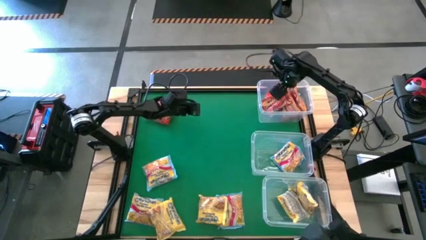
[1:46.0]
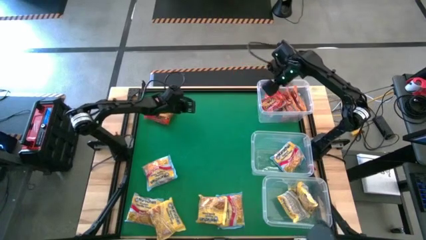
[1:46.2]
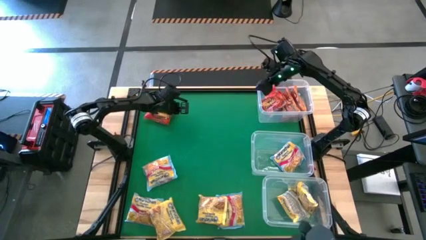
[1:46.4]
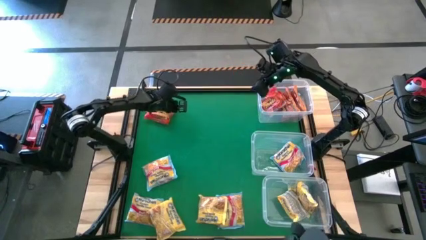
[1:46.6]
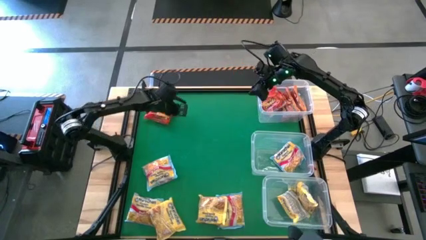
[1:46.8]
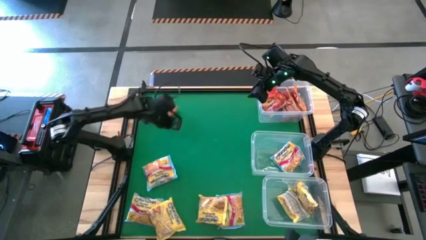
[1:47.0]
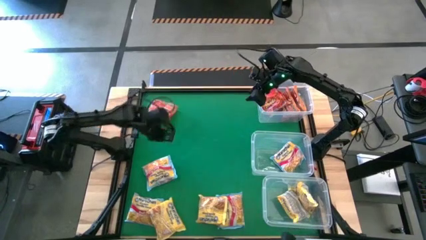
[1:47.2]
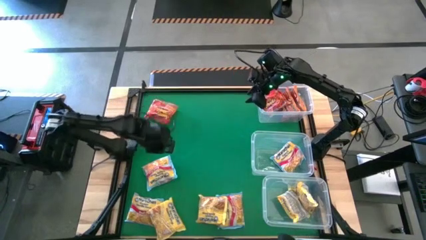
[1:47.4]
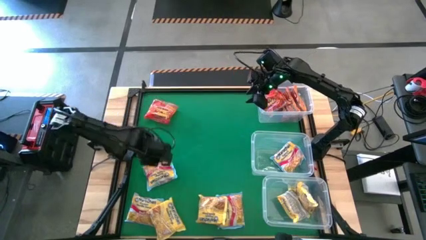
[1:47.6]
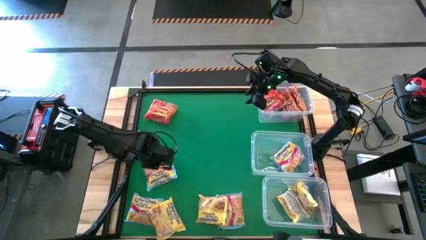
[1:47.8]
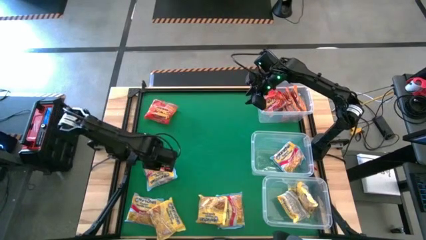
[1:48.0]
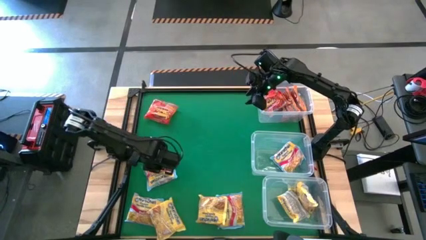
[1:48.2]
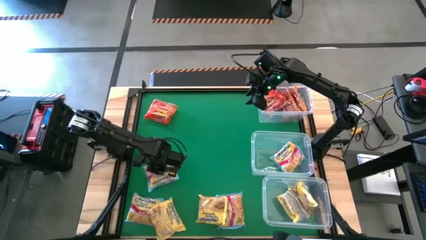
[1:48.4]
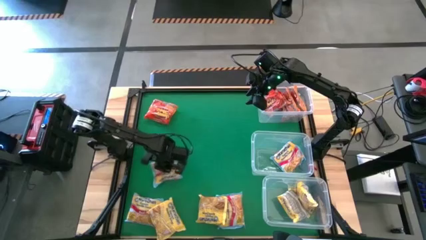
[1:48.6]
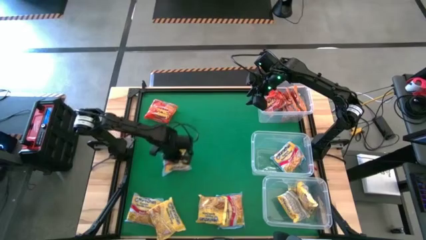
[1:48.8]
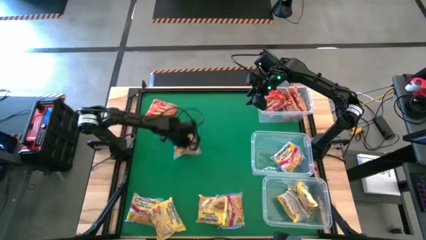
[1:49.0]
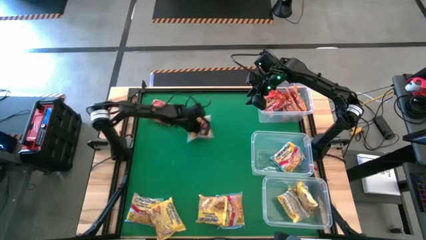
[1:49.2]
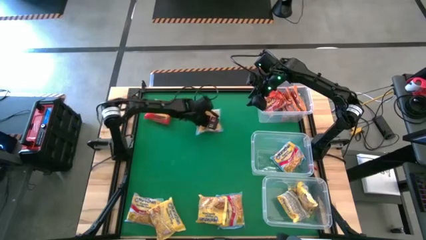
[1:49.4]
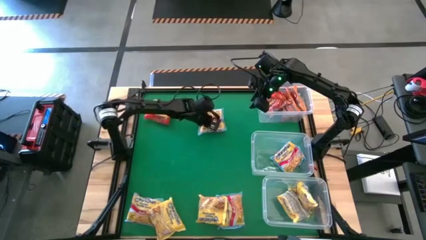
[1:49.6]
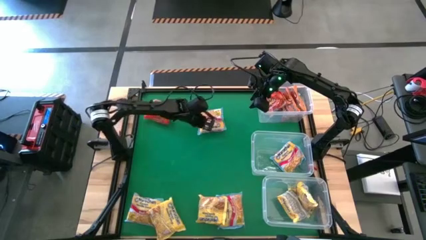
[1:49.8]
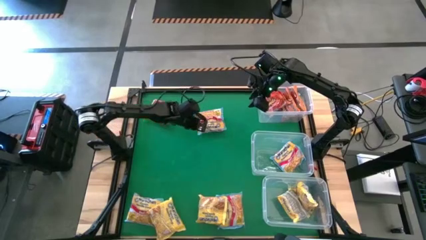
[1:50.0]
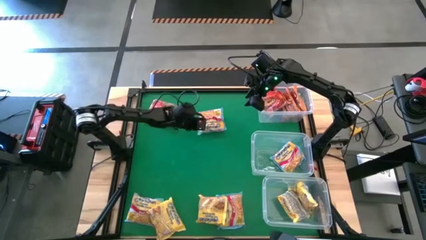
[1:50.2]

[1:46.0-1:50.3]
Task: Sort Maruchan noodles
Move the top blue noodle pack to the top middle of the table

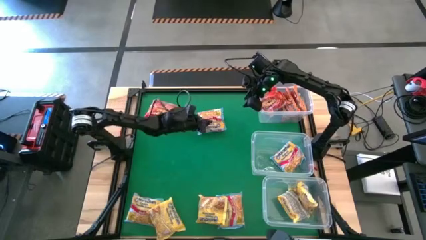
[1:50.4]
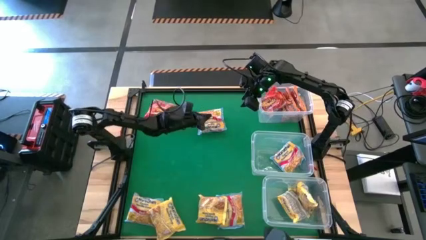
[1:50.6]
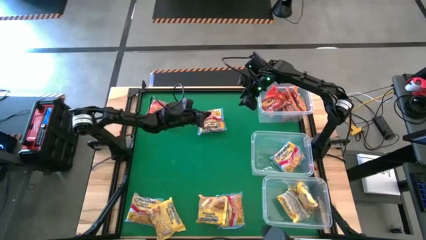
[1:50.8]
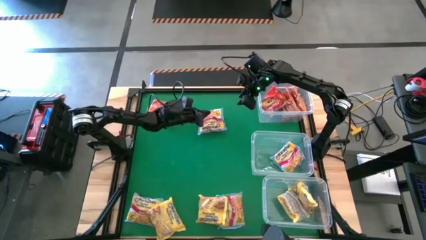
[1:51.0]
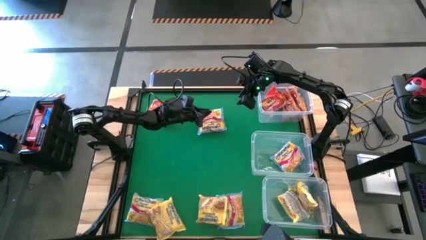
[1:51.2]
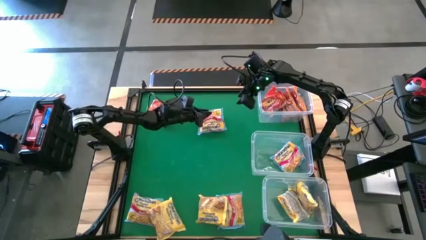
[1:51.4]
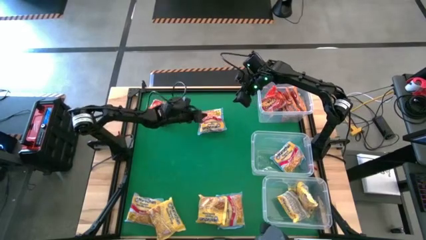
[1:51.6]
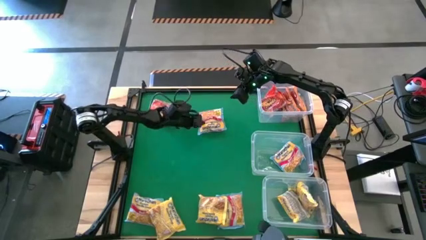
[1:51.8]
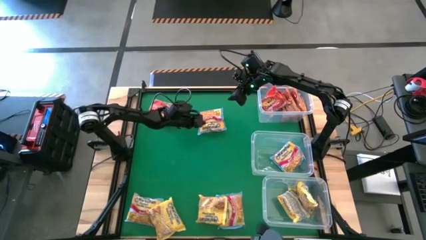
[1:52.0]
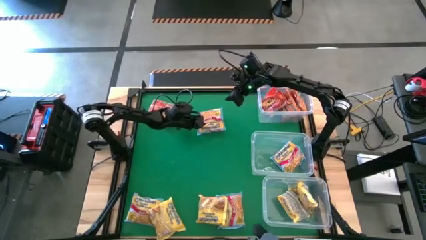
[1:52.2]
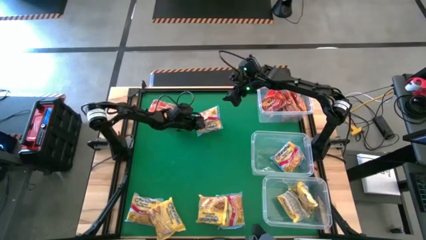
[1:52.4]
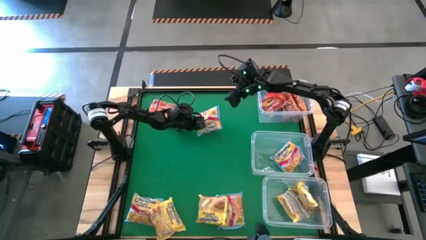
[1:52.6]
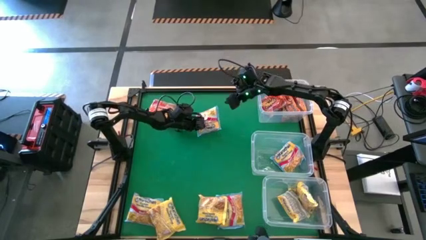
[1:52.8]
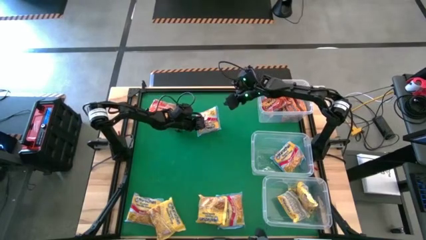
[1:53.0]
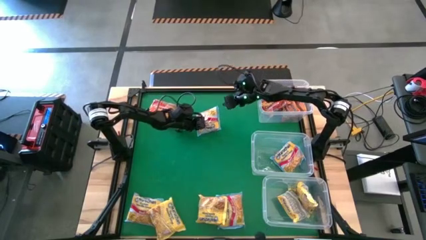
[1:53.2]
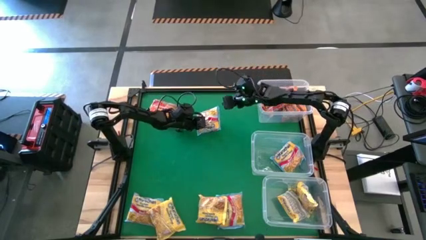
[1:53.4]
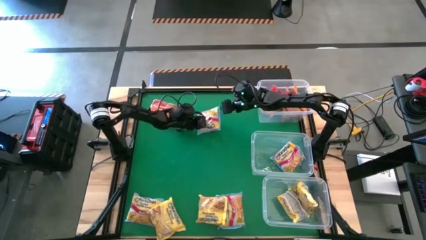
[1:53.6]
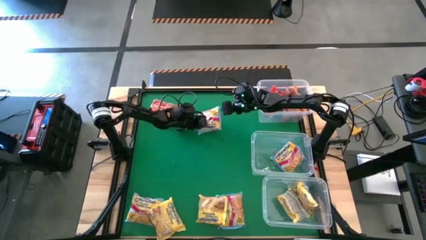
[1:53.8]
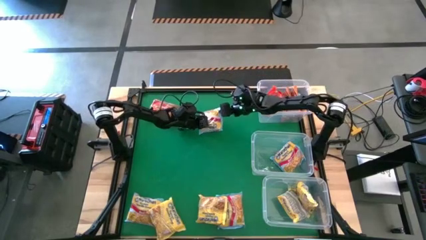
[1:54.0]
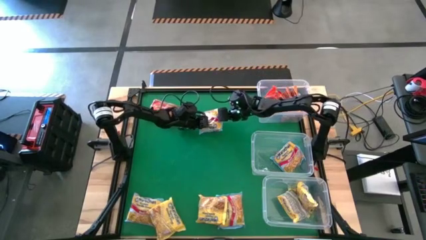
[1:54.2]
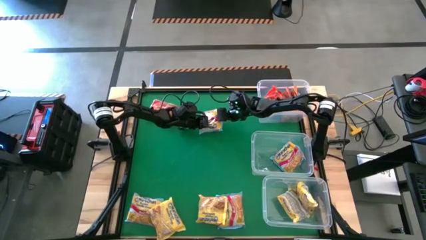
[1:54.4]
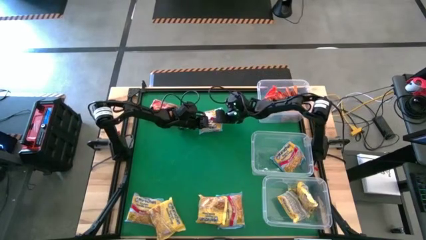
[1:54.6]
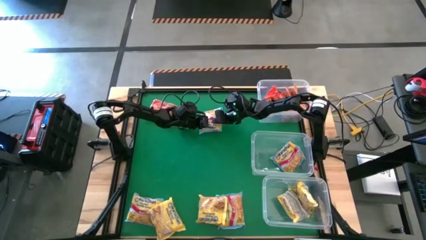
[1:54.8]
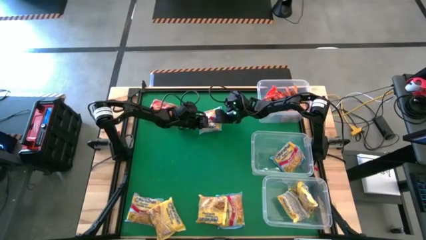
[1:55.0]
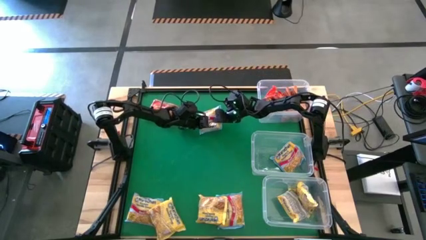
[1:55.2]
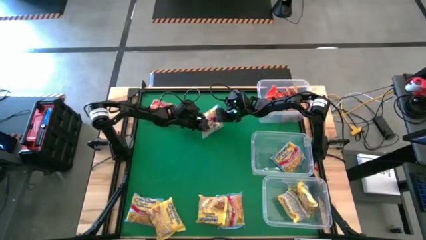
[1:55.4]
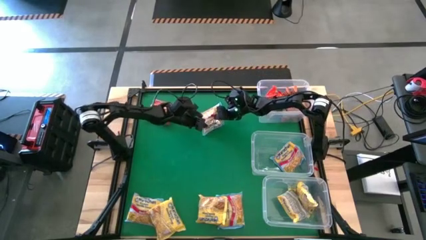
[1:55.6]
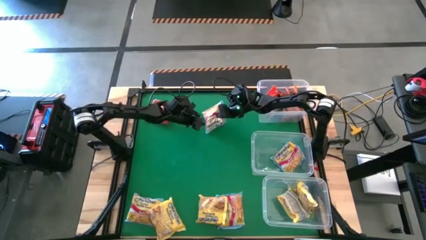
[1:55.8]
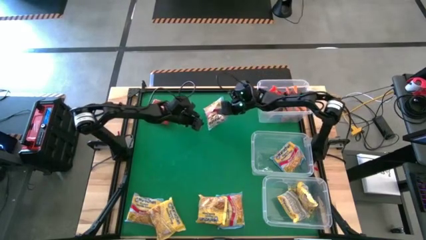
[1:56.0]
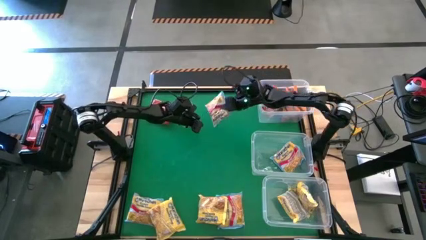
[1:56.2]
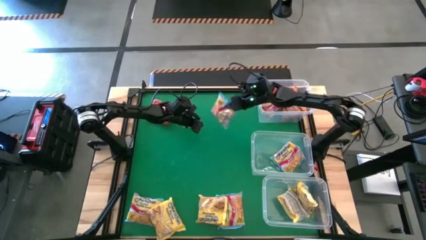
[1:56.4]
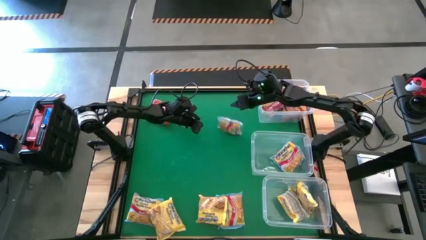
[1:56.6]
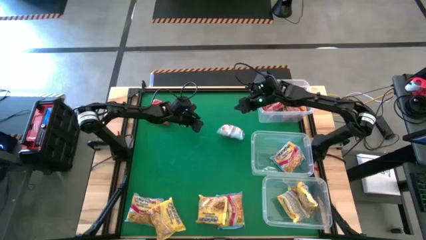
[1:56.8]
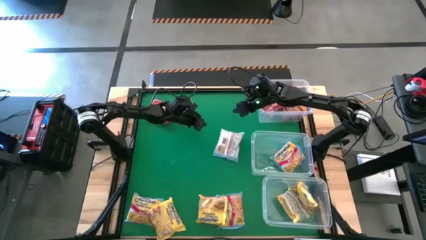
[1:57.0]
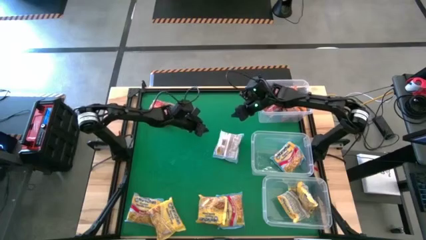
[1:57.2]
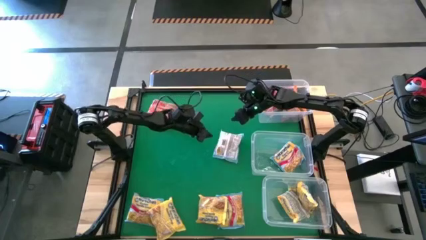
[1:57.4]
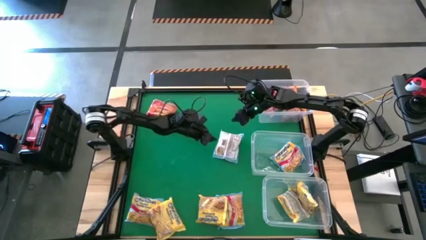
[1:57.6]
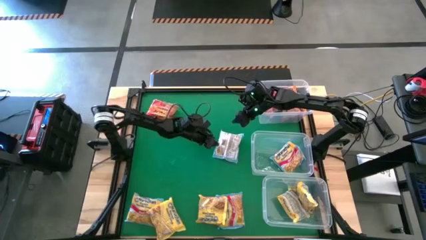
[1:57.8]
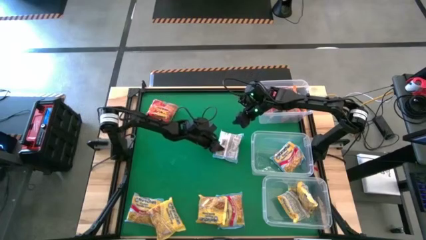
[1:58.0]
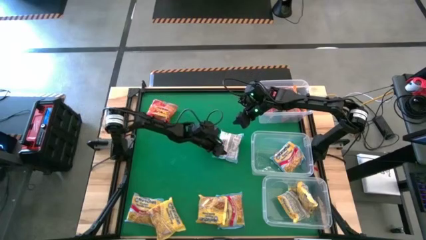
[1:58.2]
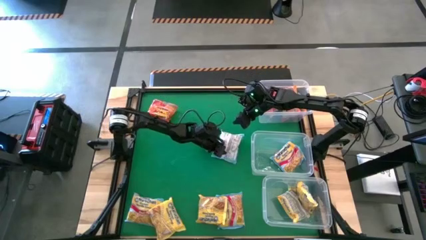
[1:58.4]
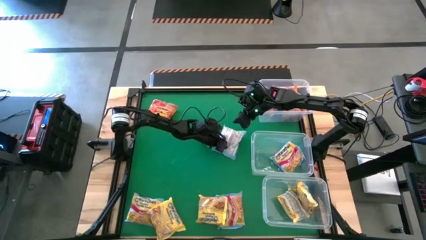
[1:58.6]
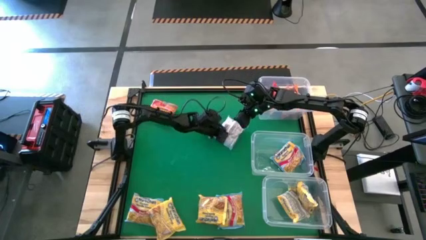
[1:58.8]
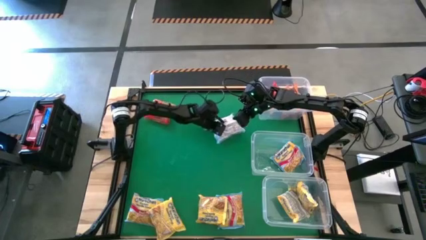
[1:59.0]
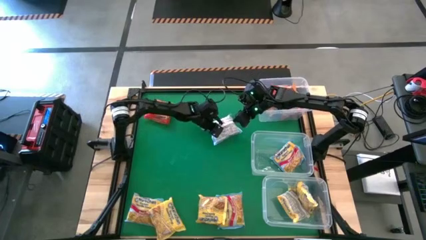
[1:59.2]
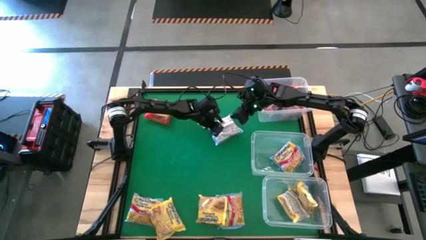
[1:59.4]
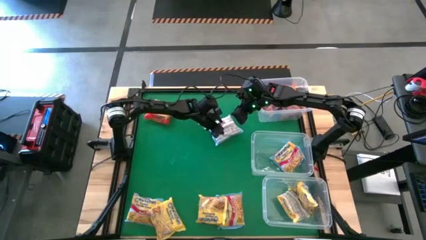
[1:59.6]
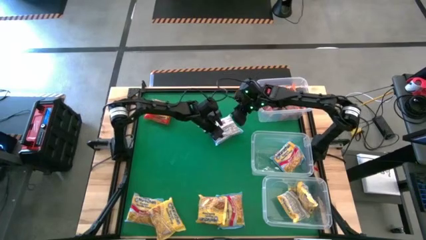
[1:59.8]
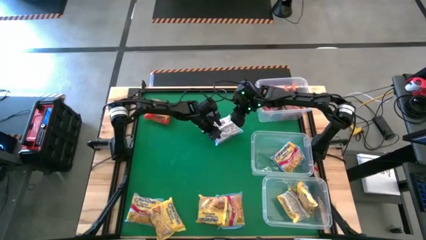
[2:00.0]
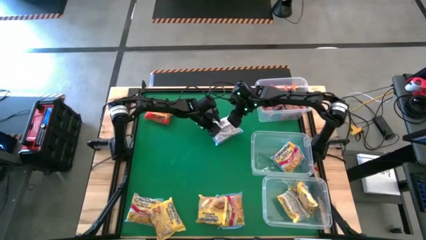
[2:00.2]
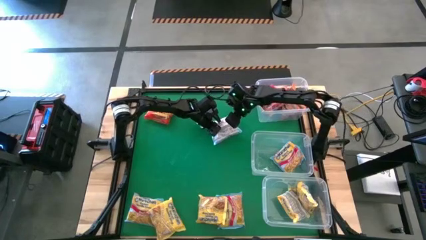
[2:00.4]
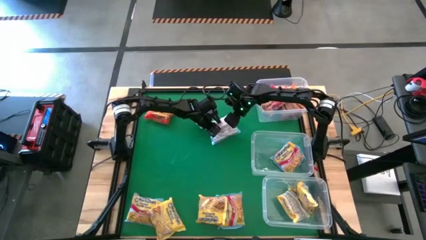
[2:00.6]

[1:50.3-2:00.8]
Put the top middle noodle pack into the middle transparent bin
